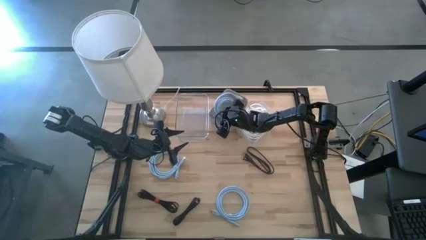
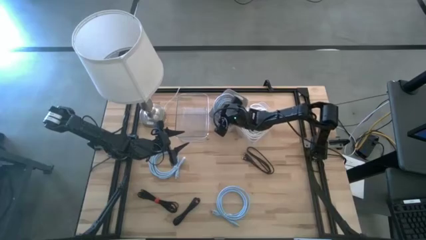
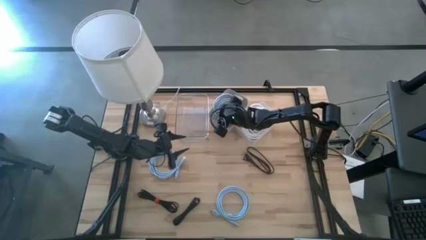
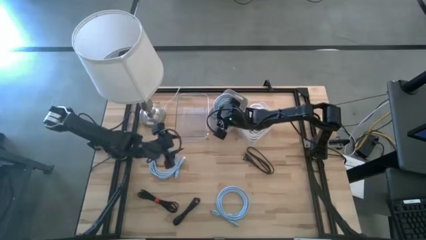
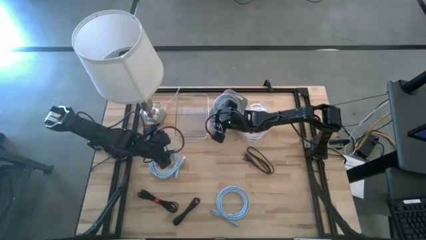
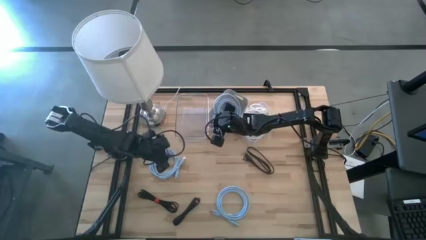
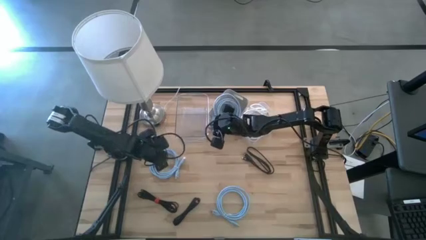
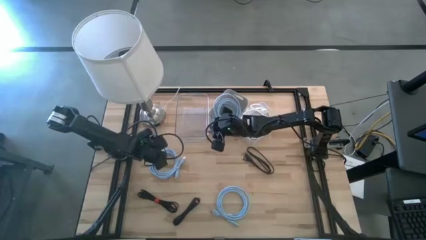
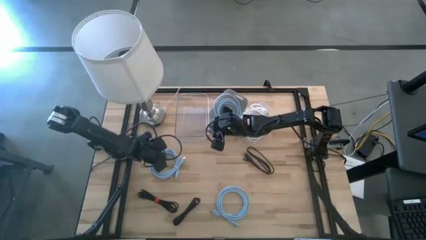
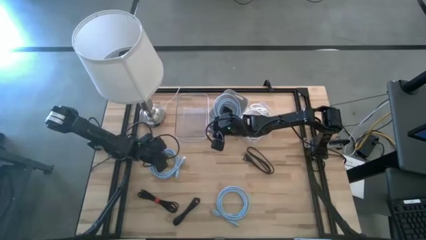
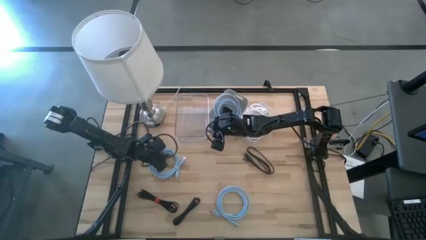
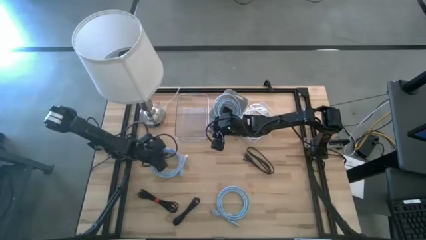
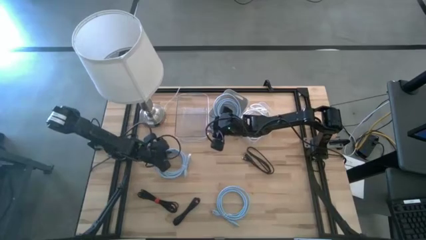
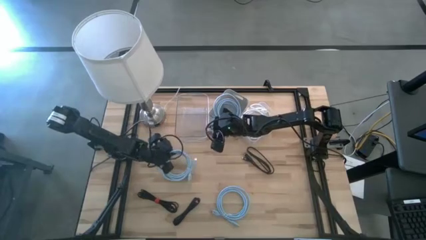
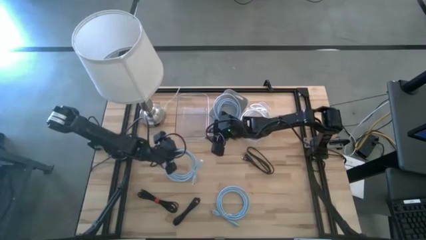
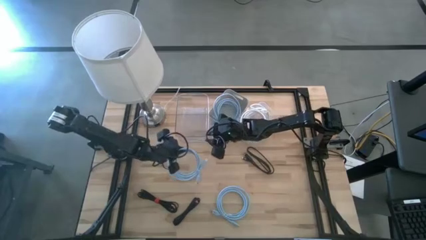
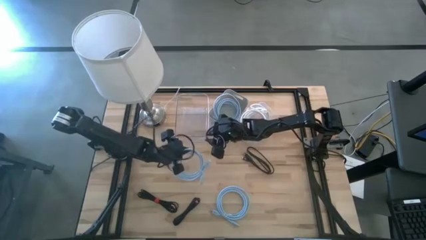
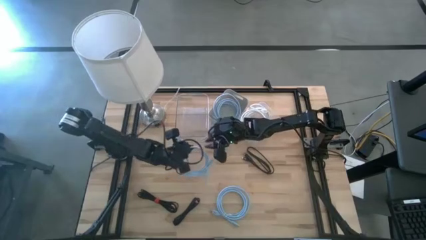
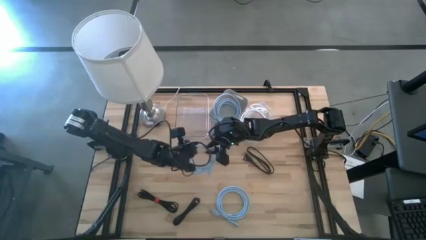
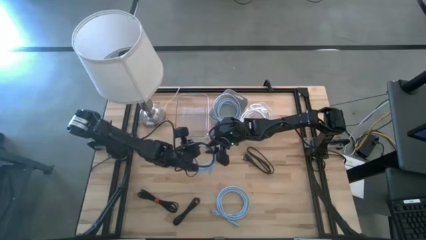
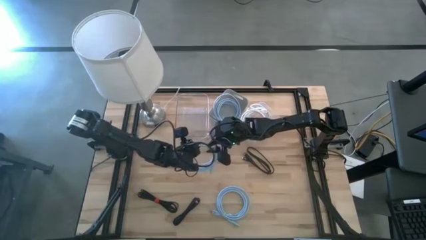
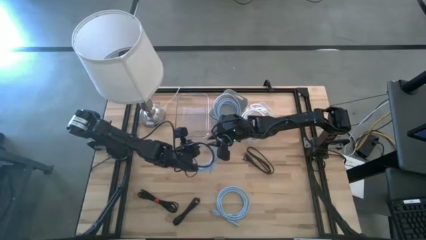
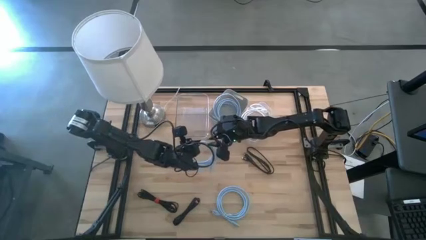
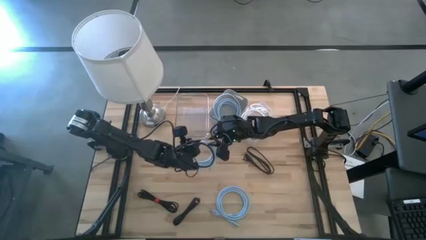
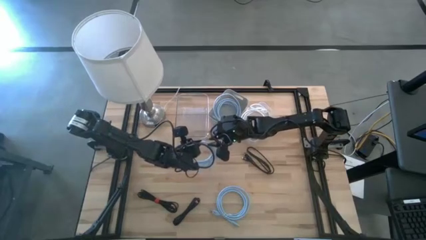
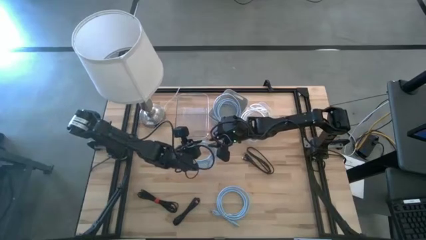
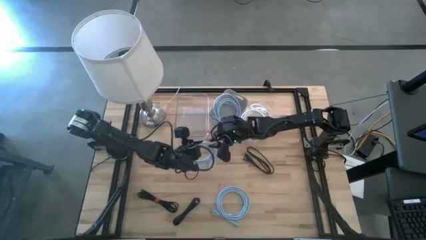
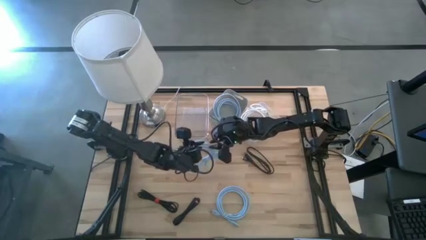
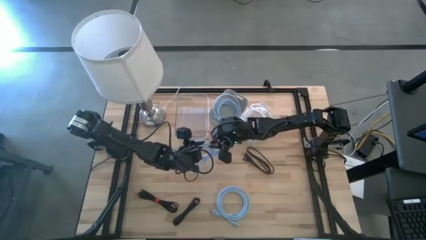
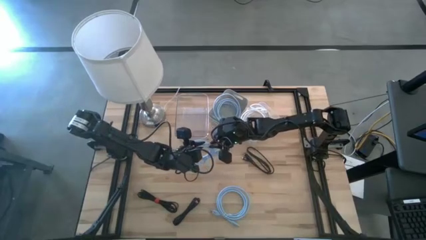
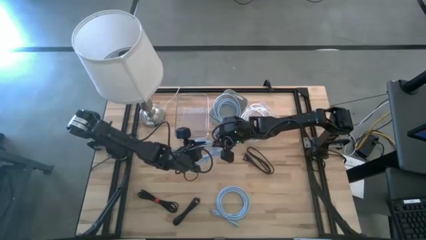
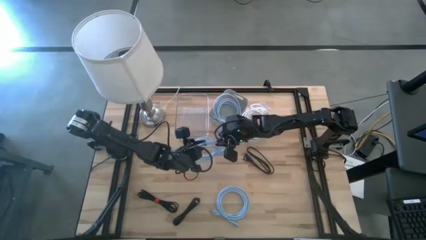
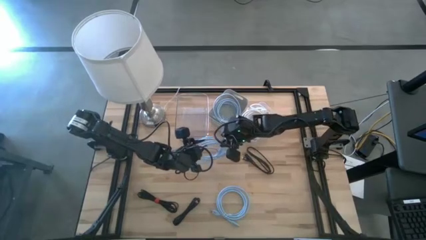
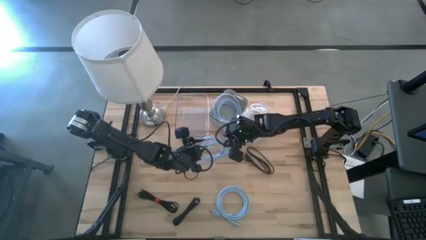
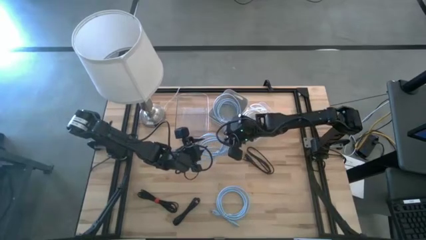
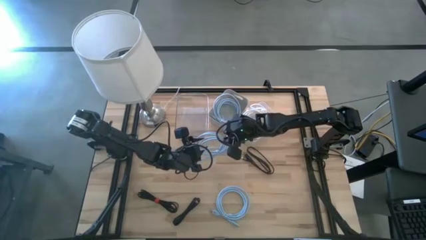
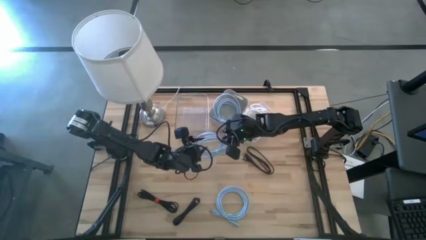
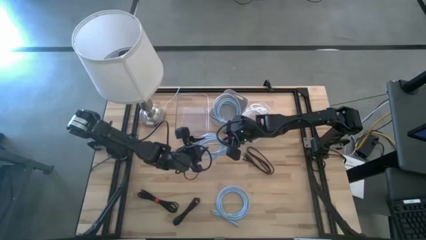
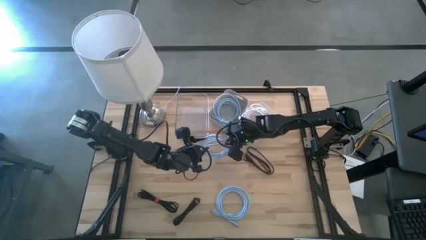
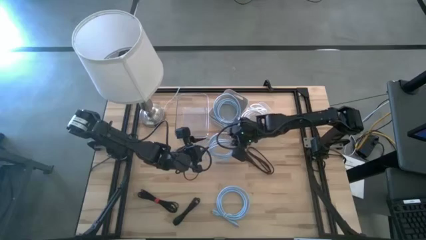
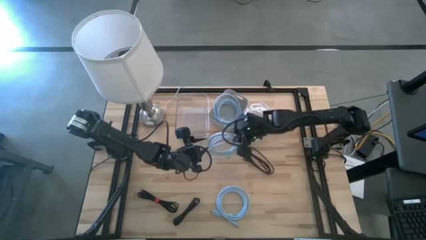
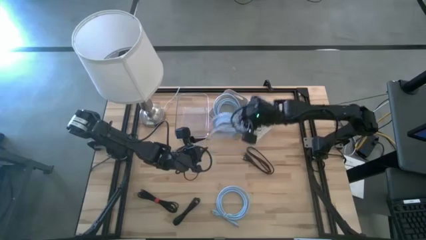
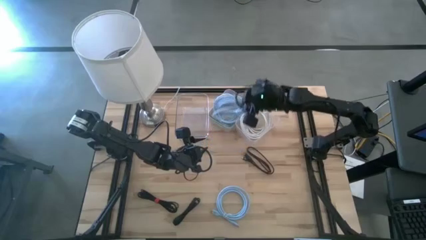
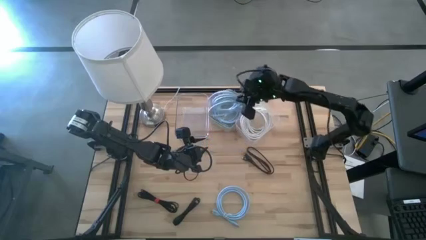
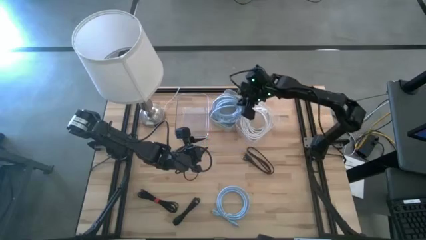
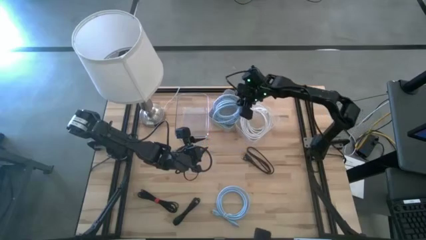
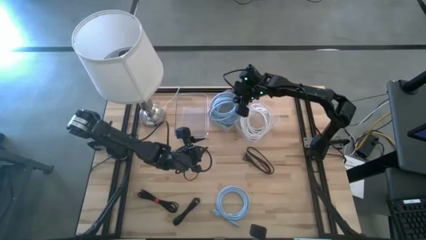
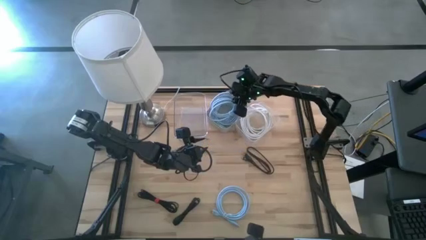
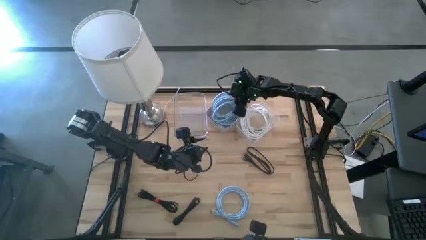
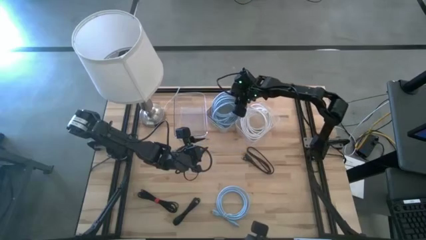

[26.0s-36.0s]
Task: Sort HDMI cables
Put the top blue HDMI cable into the gray bin

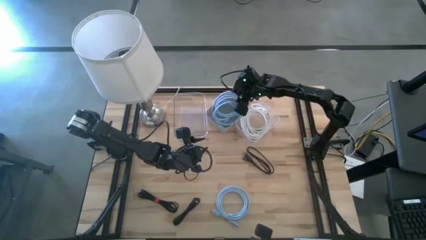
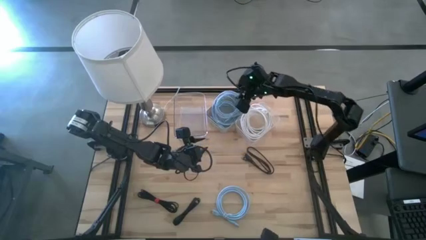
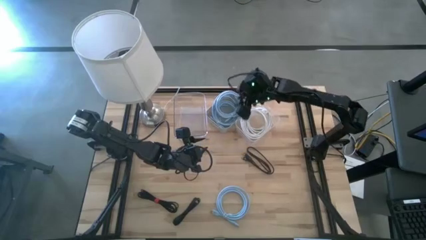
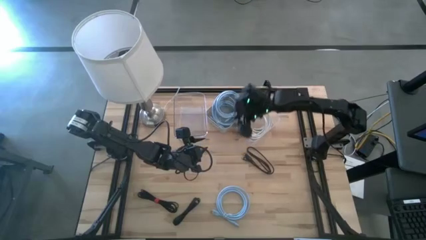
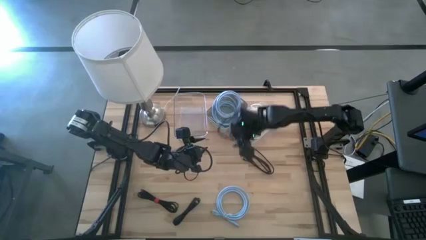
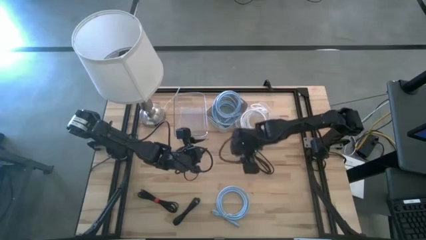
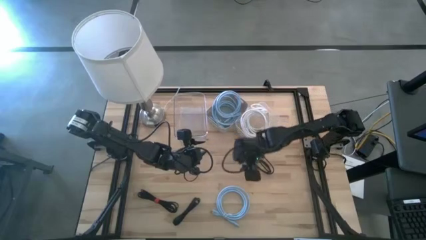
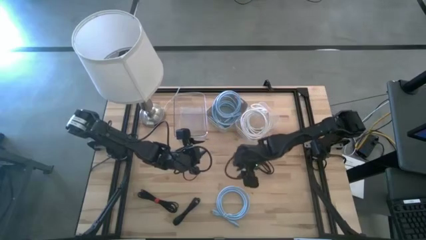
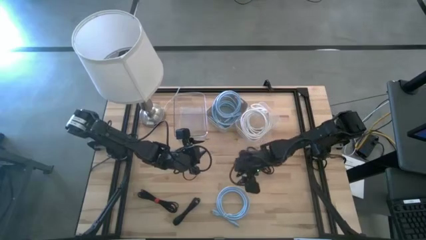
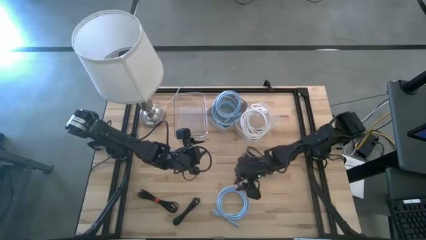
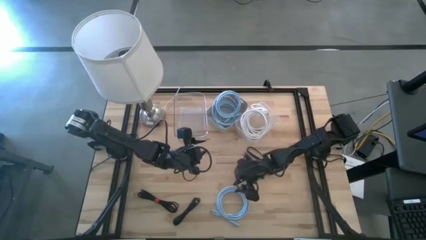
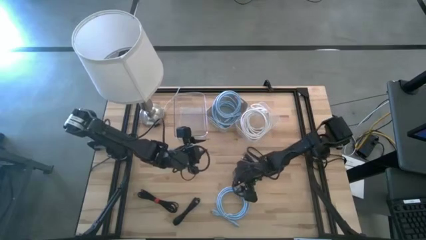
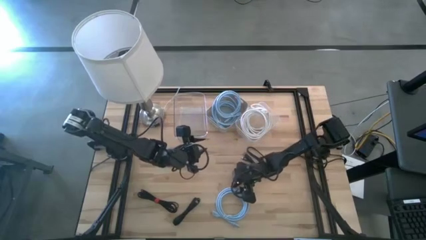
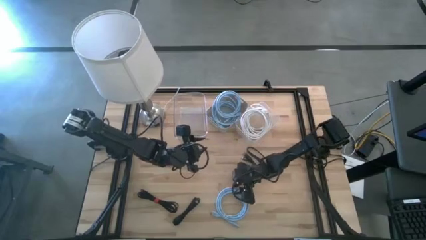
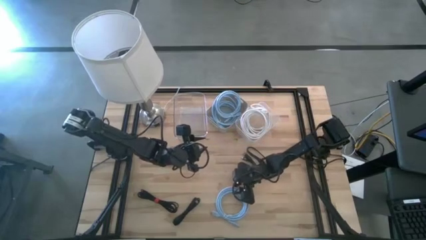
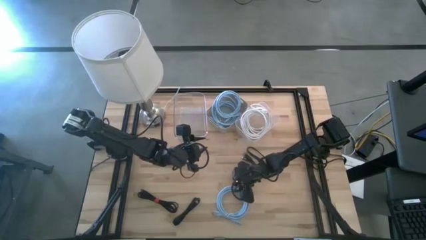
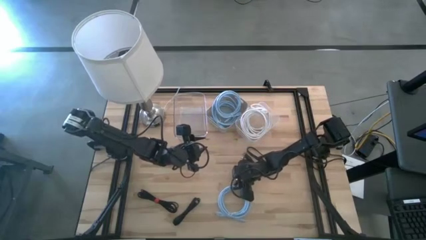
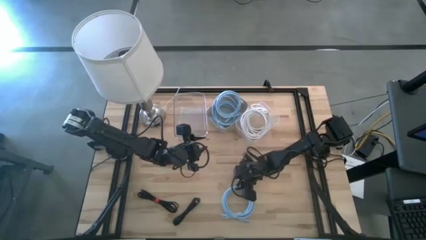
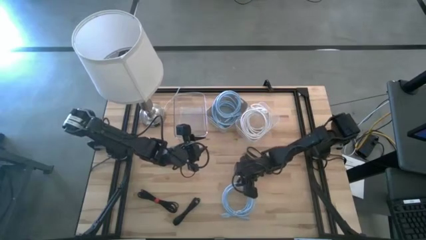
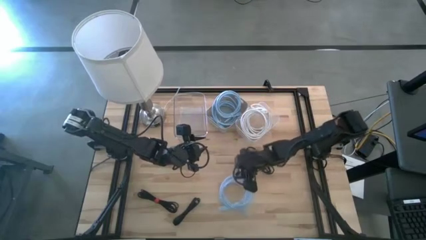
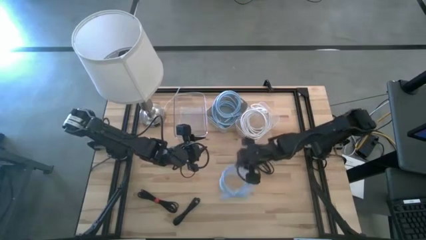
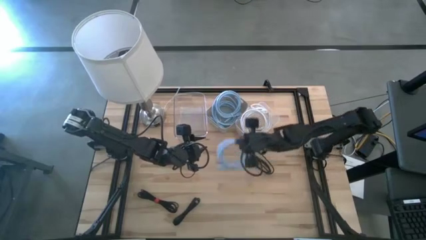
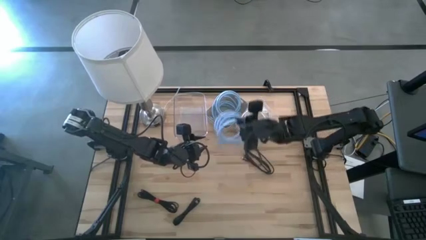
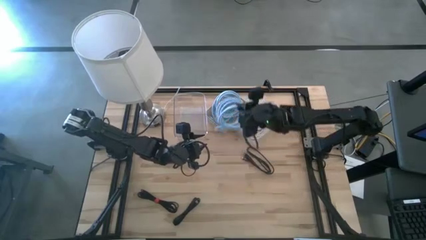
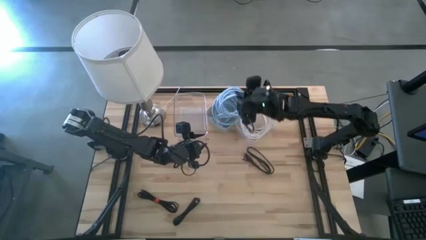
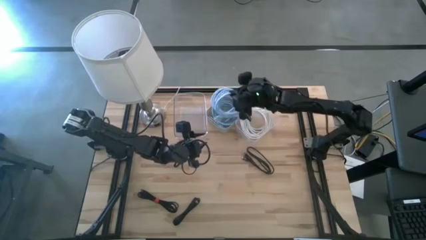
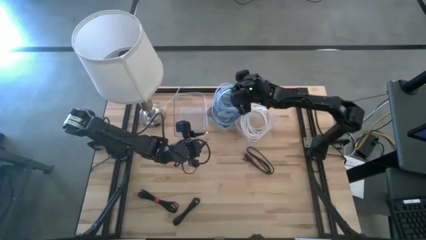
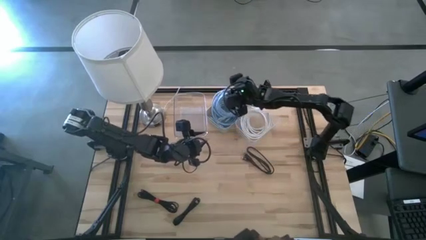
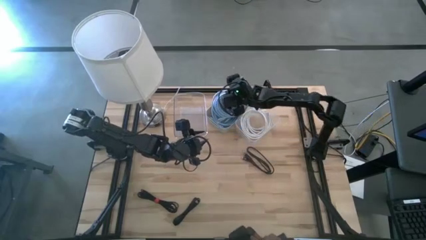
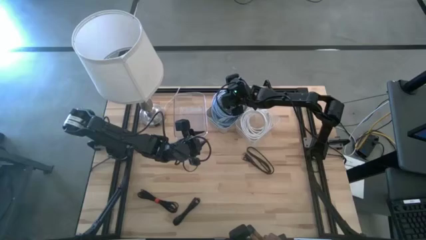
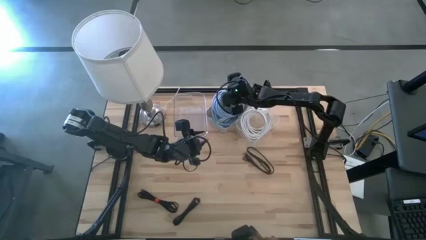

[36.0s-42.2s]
Put the blue HDMI cable into the gray bin
